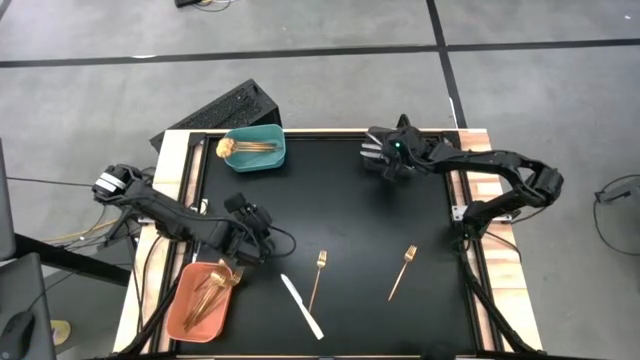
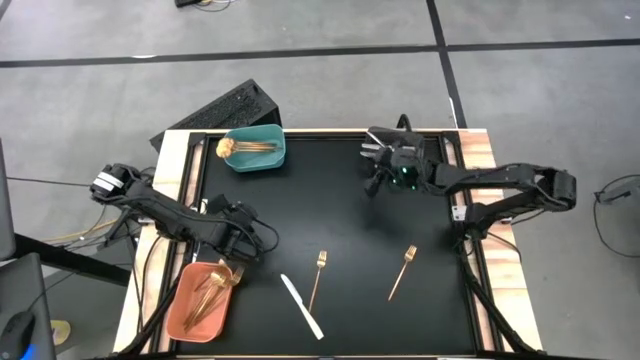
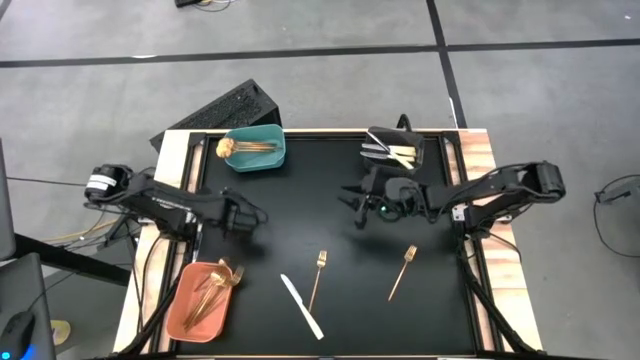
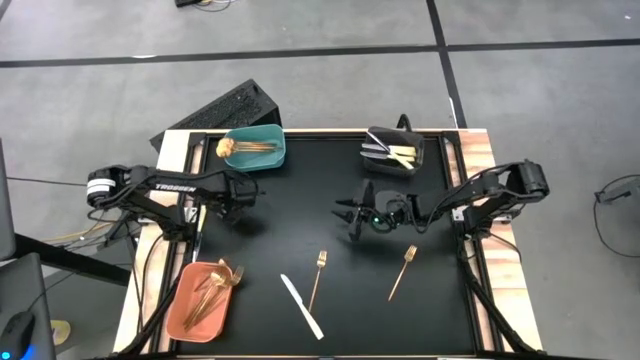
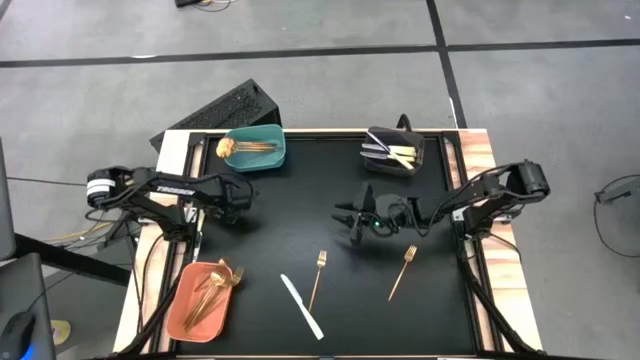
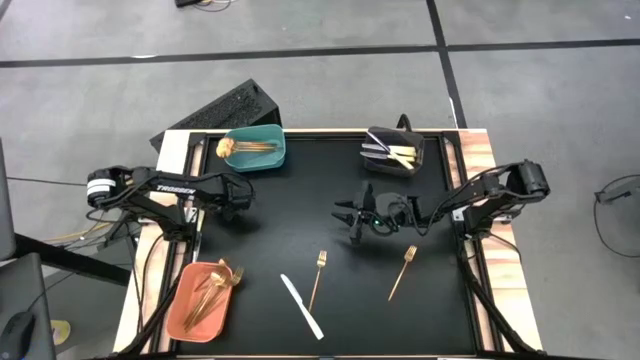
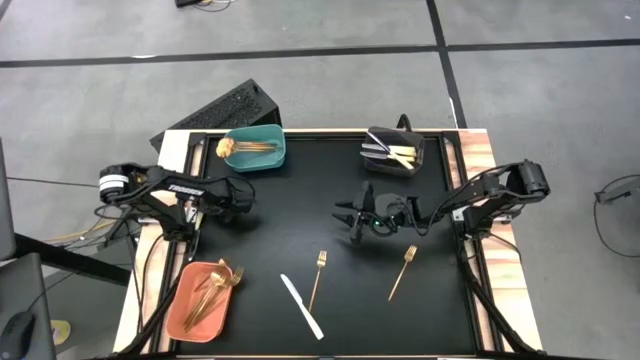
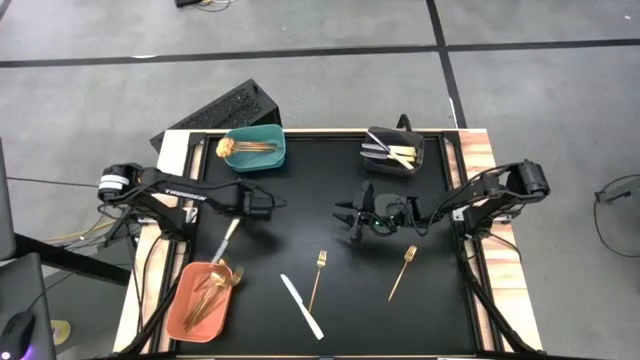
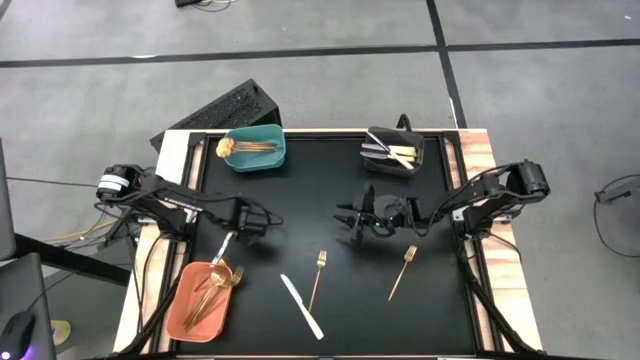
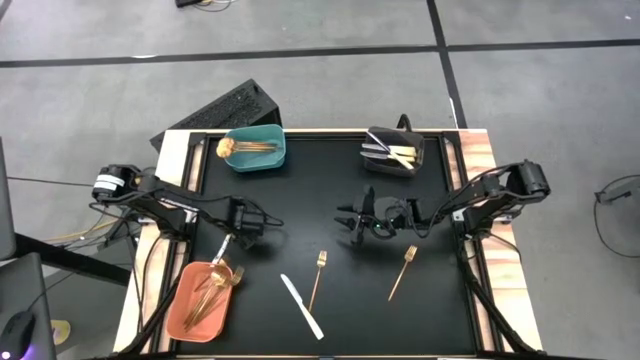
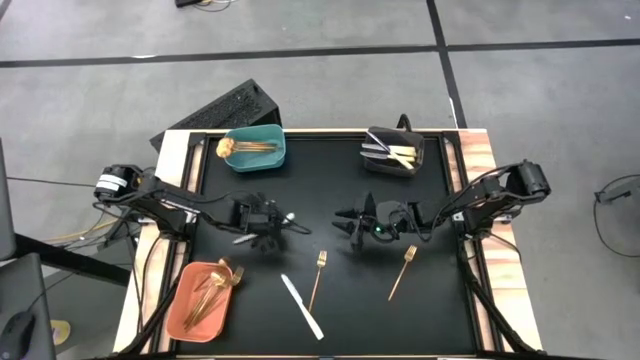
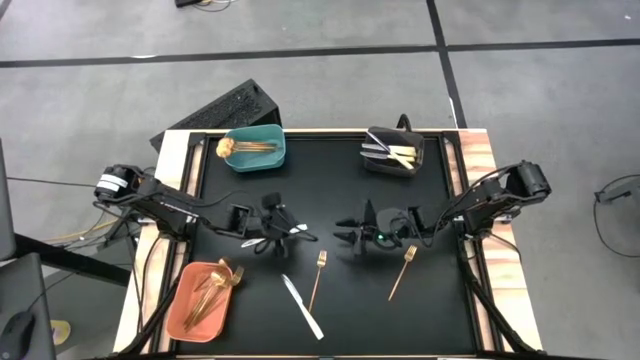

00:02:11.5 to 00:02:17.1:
Task: Sort silverware by color (type)
Put the yellow table knife into the black bin

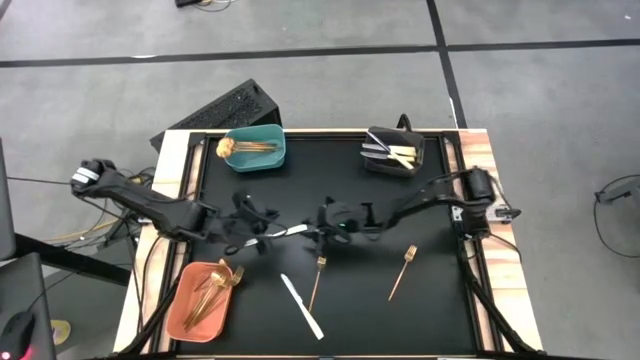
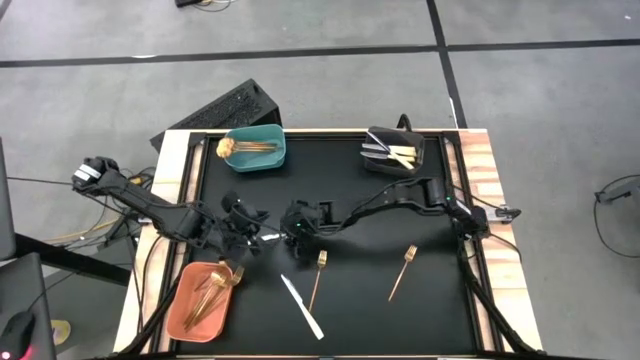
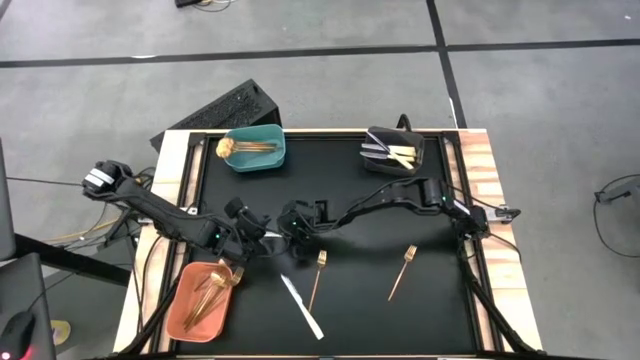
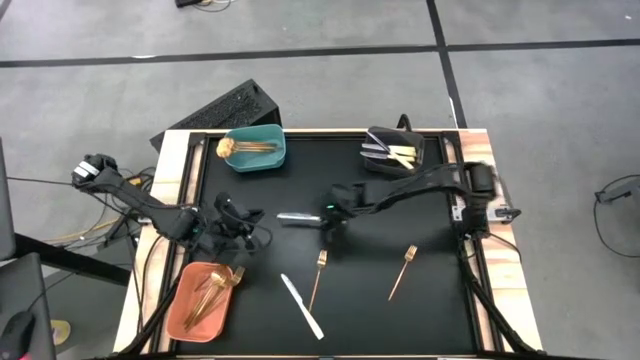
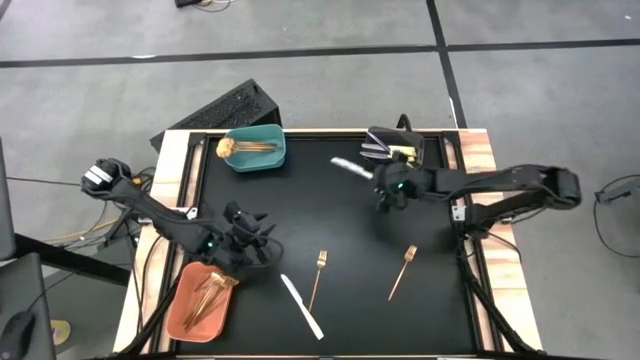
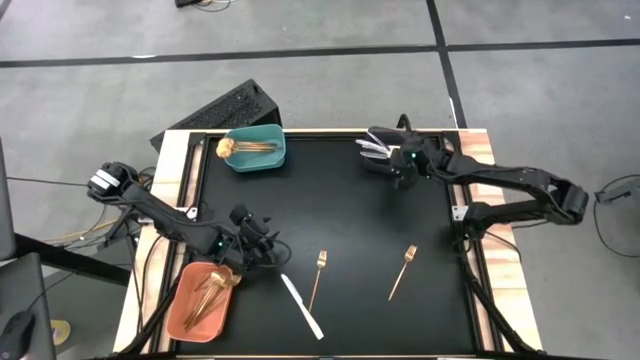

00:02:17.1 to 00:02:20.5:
Put the yellow table knife into the black bin

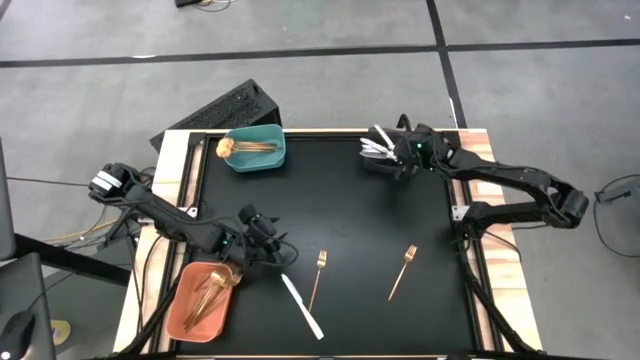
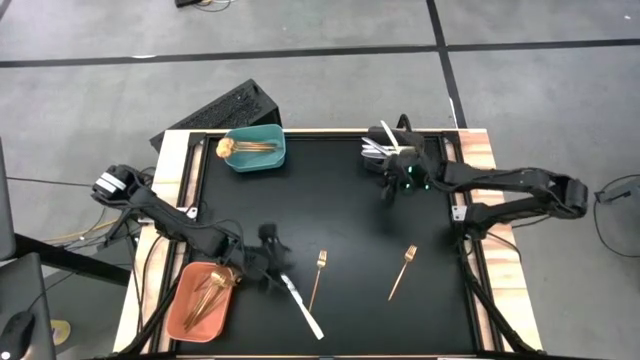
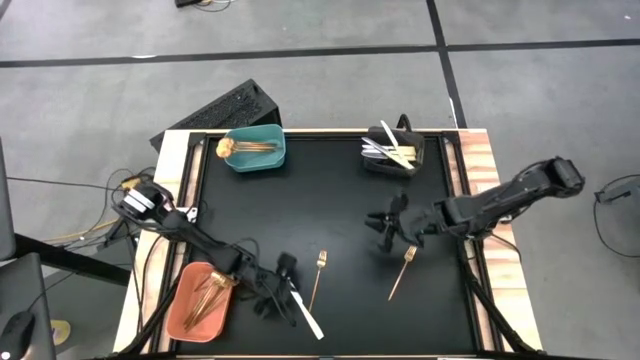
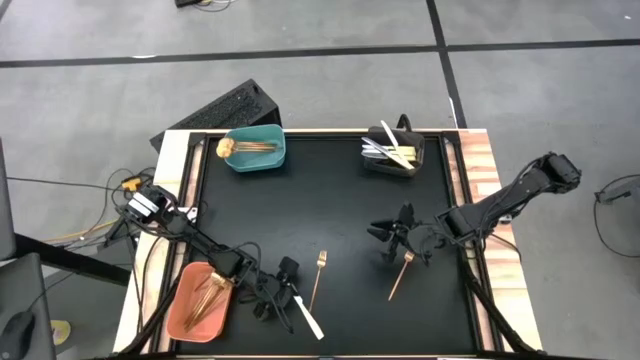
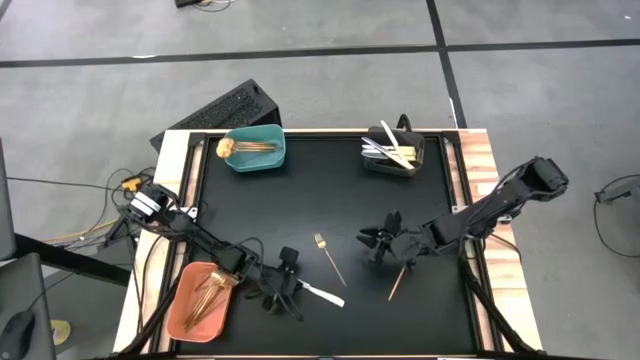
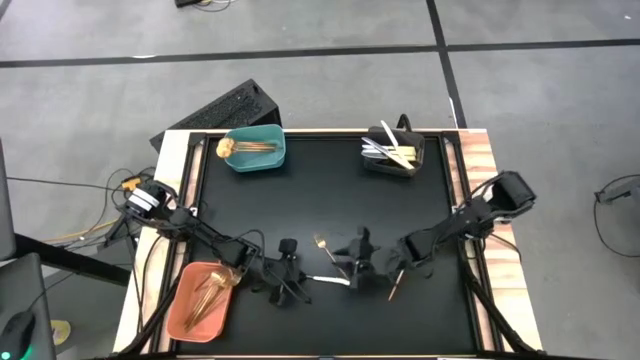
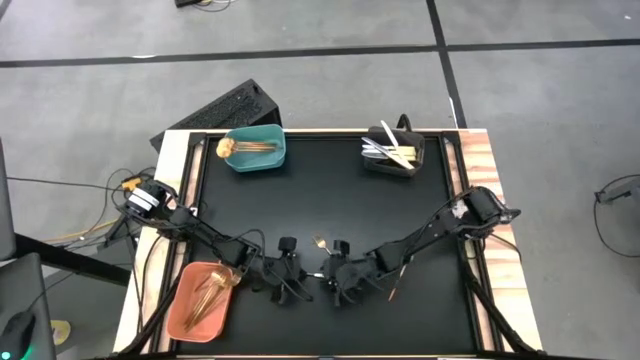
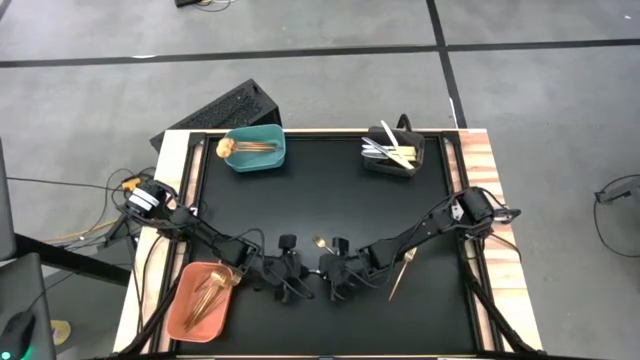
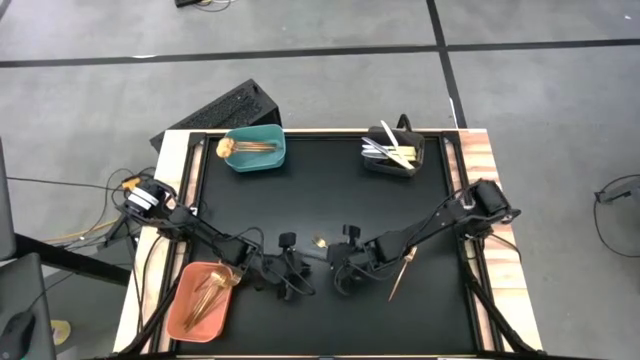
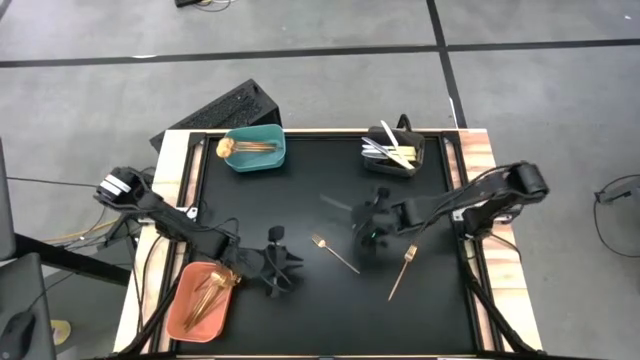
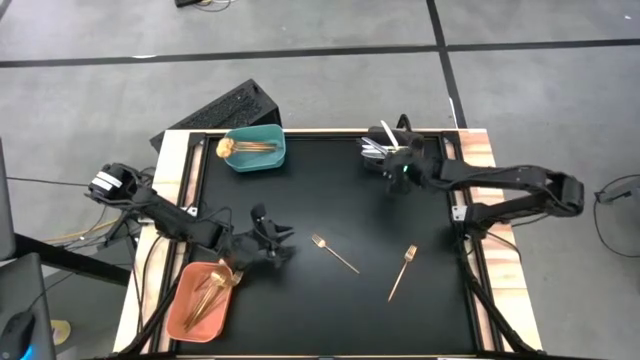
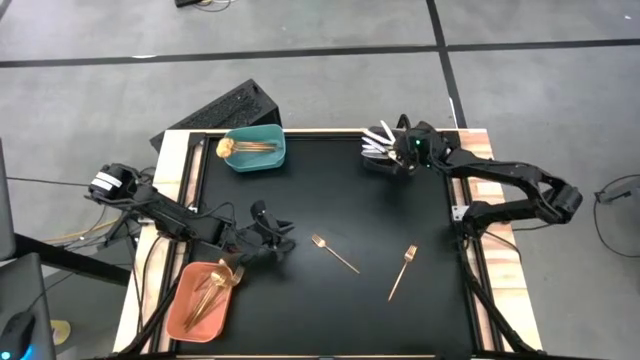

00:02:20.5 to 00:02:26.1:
Put the yellow table knife into the black bin

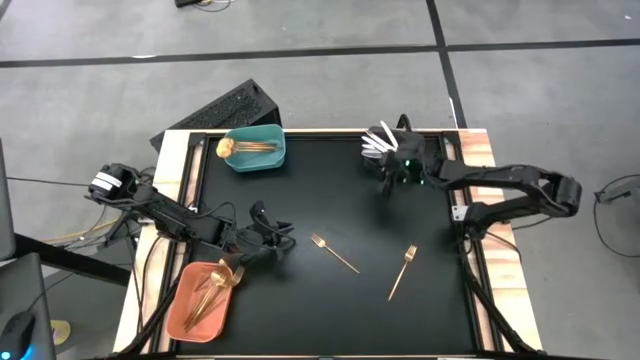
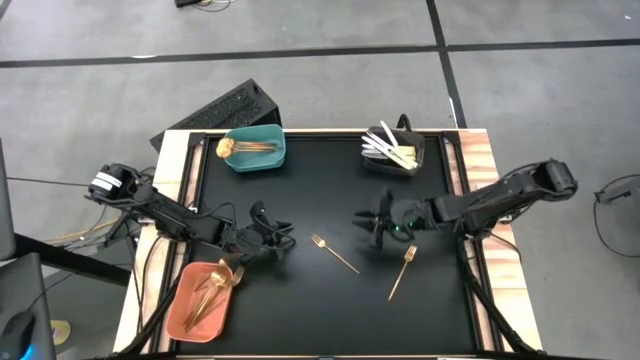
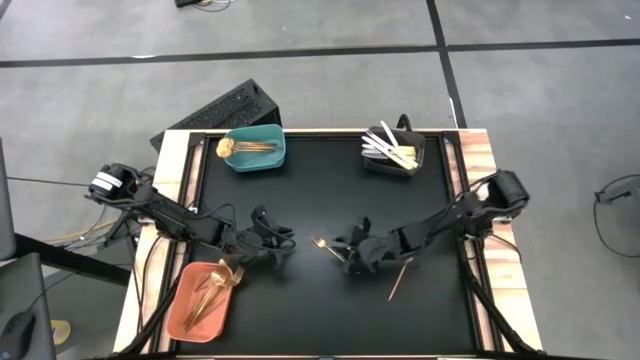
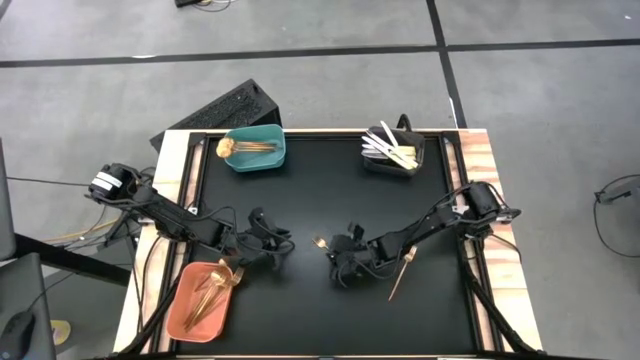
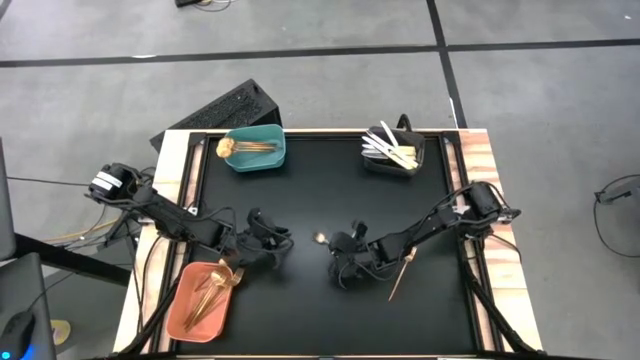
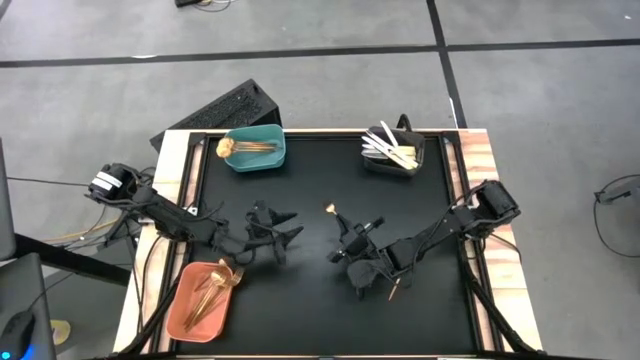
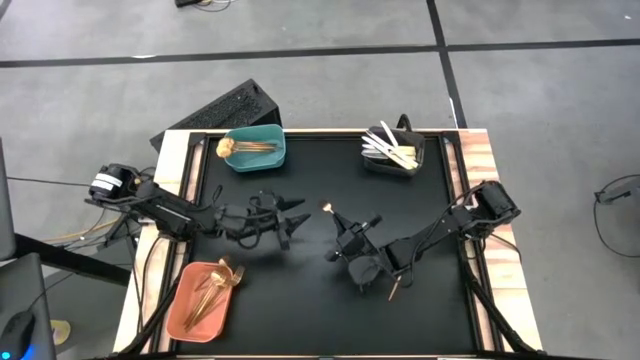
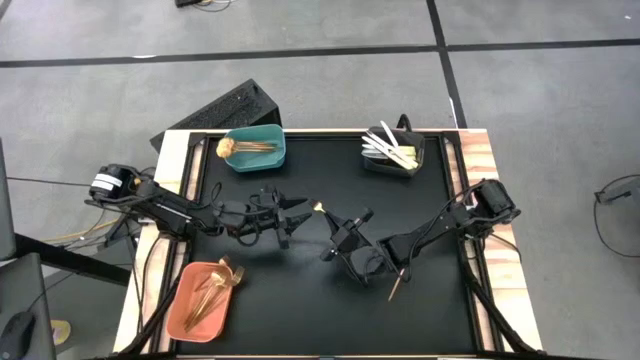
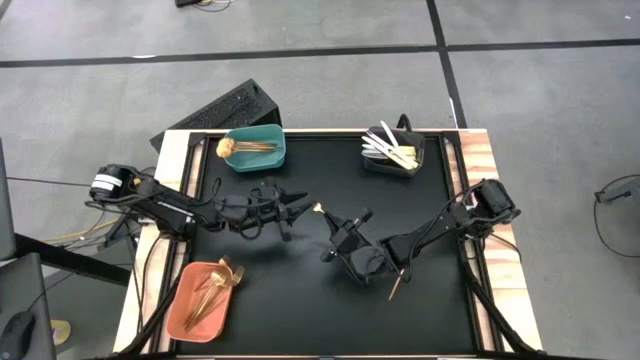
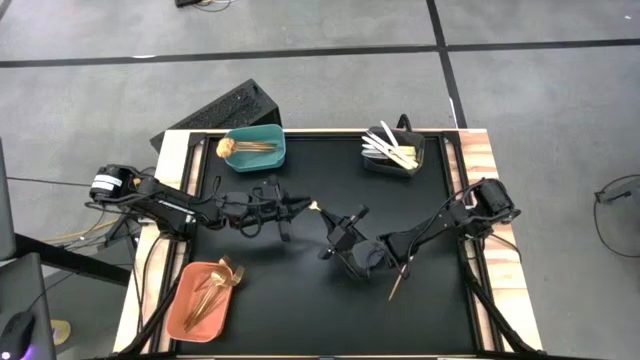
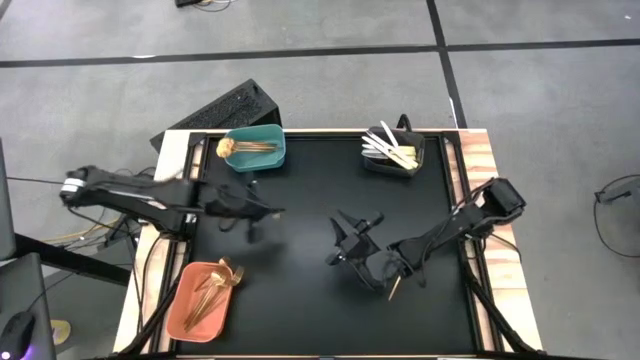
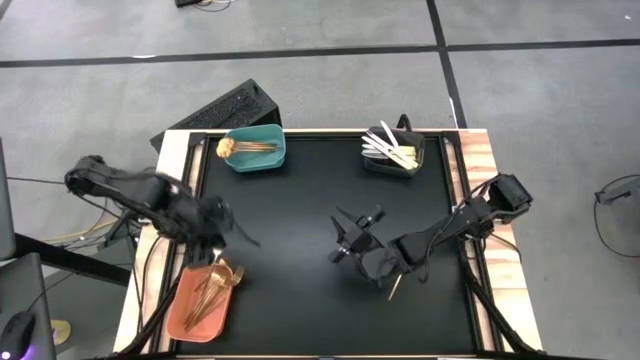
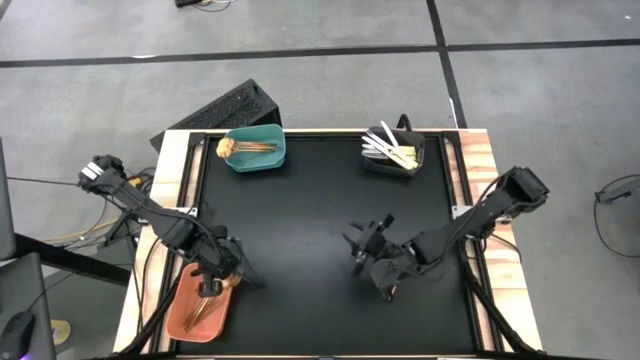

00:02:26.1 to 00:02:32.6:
Put the gold fork into the orange bin
